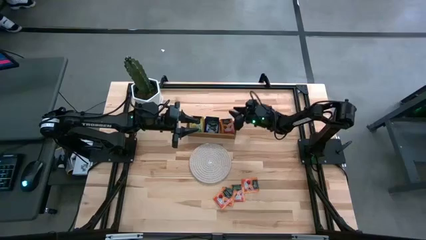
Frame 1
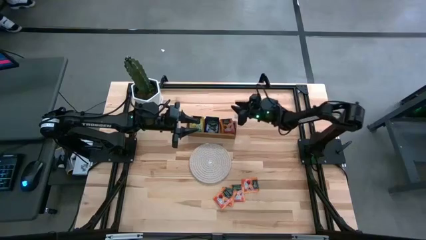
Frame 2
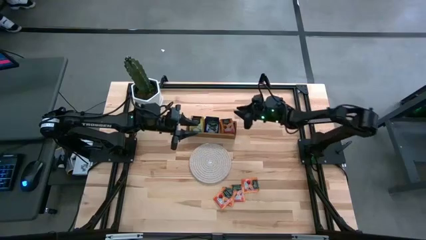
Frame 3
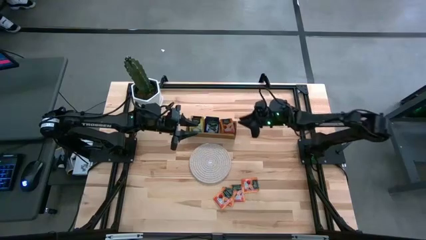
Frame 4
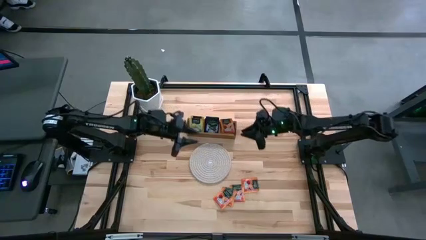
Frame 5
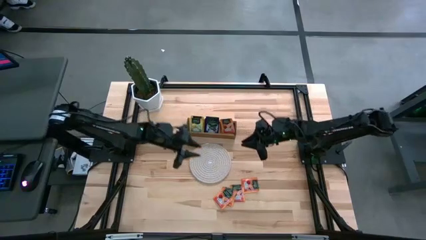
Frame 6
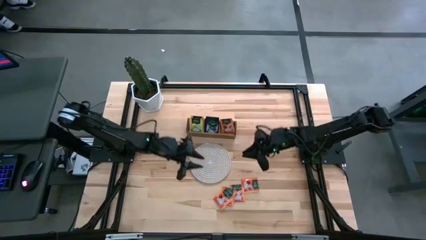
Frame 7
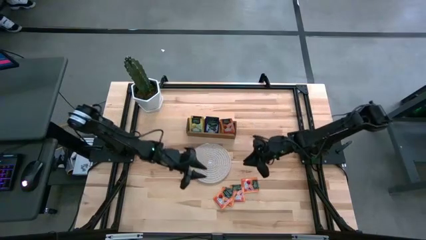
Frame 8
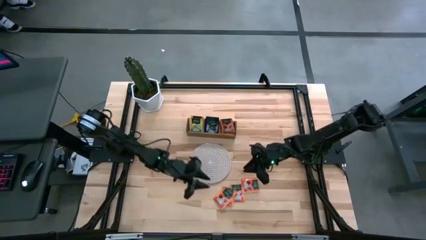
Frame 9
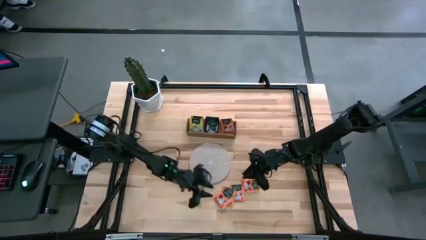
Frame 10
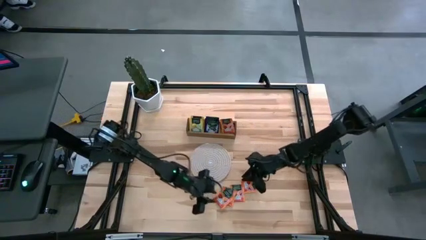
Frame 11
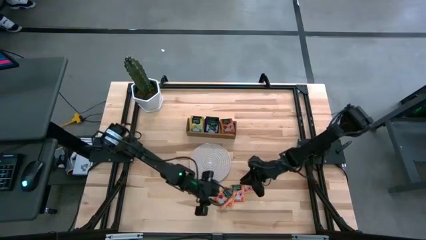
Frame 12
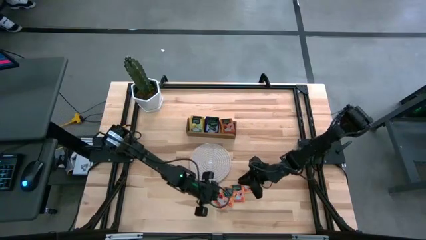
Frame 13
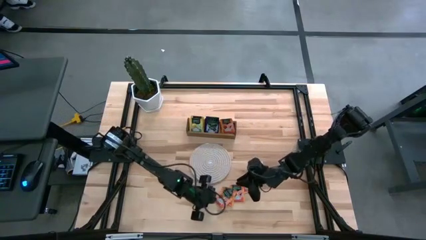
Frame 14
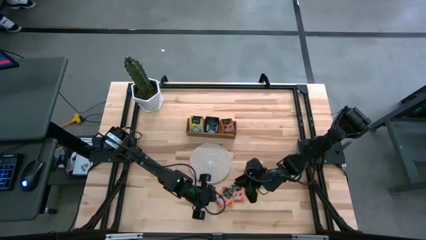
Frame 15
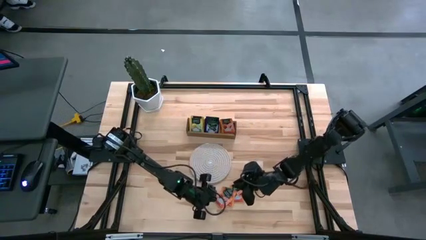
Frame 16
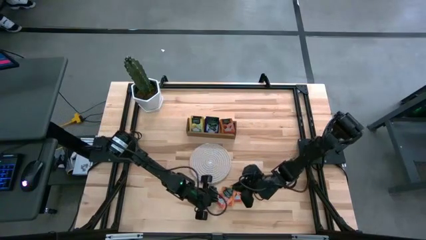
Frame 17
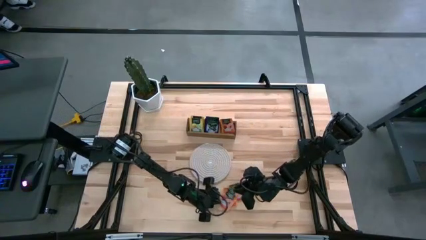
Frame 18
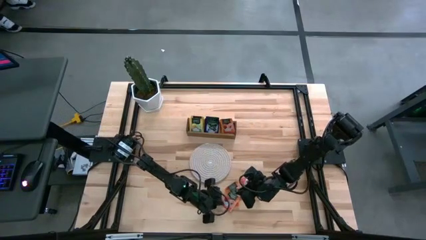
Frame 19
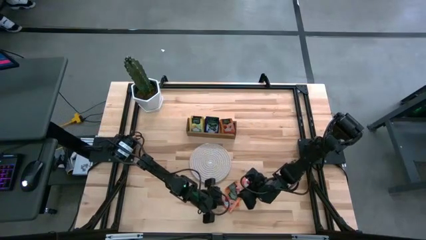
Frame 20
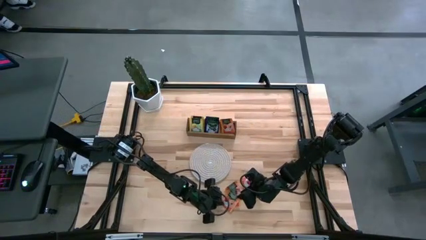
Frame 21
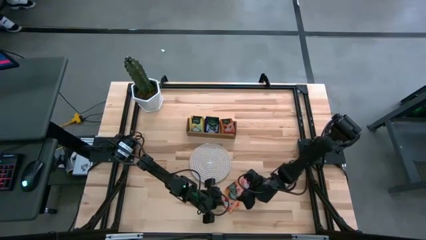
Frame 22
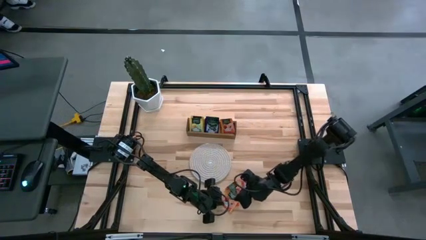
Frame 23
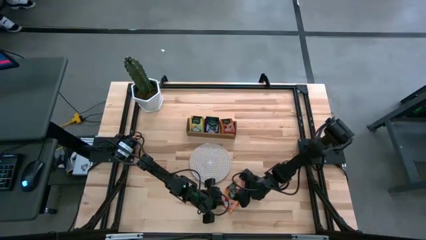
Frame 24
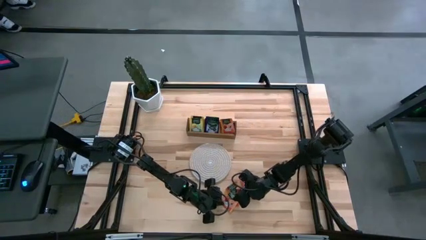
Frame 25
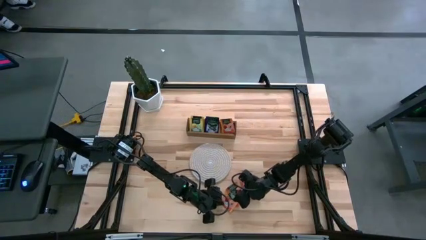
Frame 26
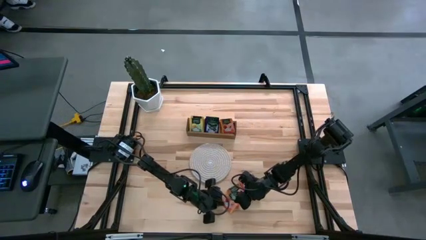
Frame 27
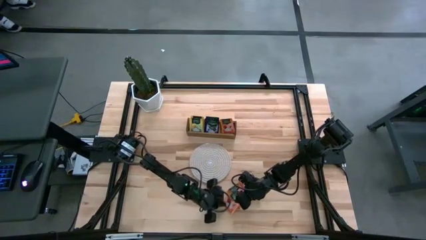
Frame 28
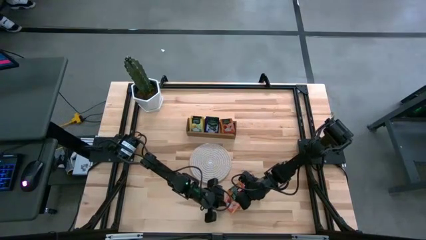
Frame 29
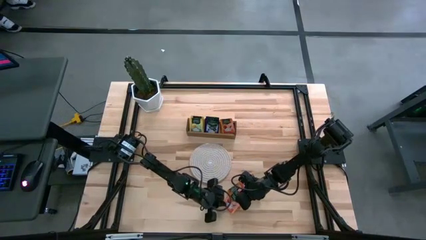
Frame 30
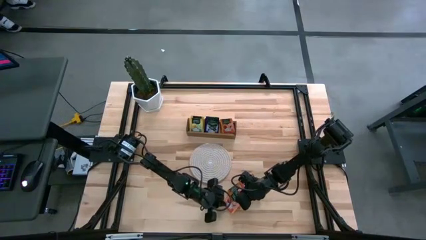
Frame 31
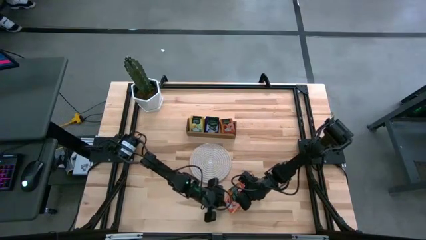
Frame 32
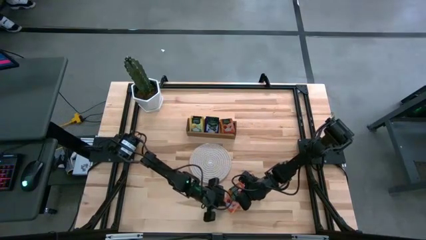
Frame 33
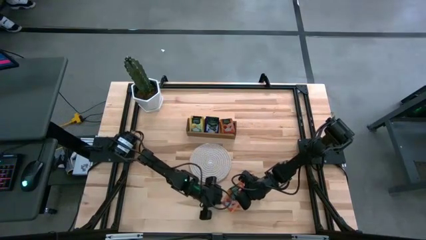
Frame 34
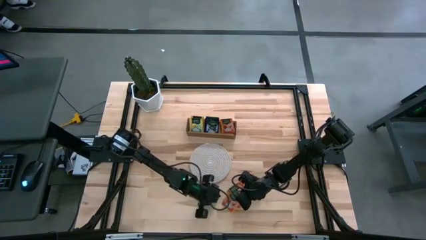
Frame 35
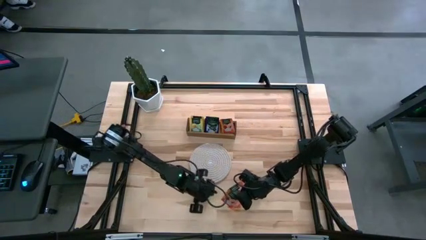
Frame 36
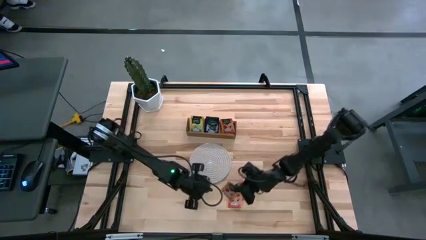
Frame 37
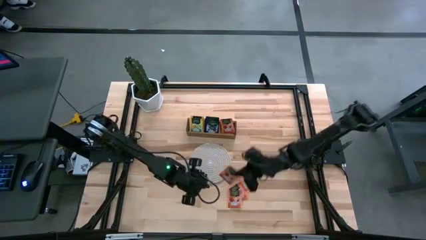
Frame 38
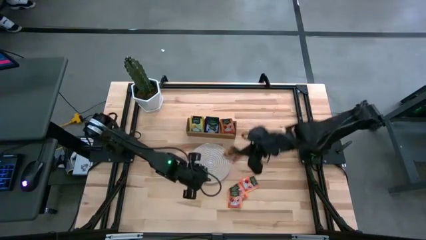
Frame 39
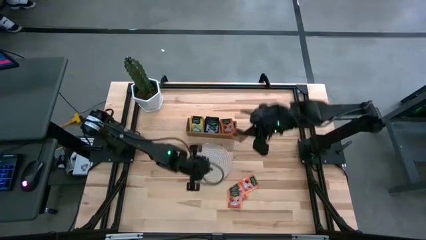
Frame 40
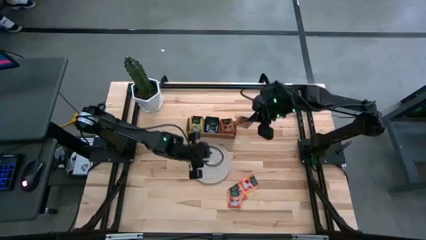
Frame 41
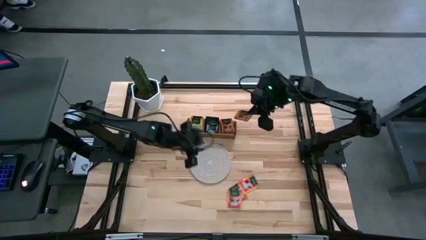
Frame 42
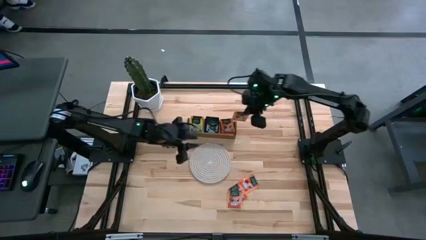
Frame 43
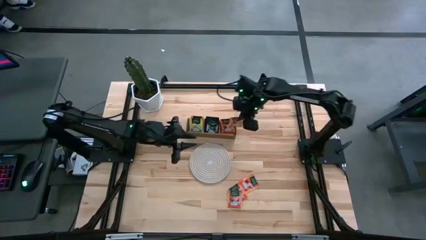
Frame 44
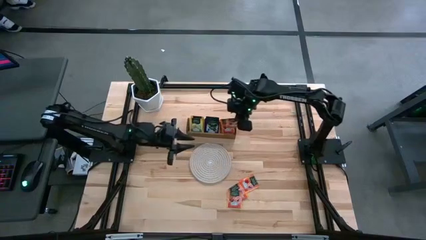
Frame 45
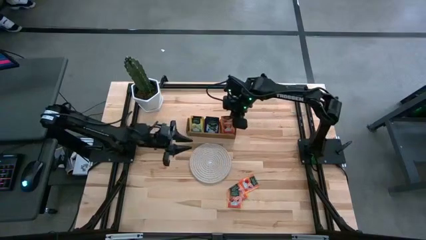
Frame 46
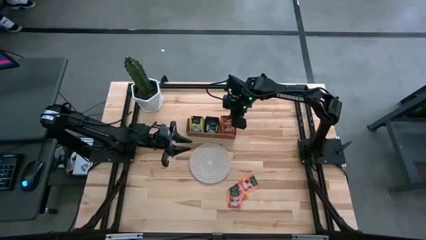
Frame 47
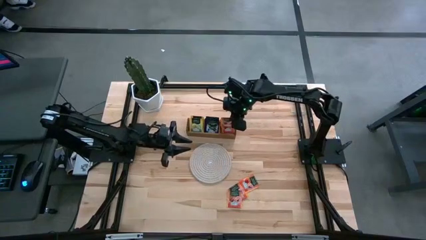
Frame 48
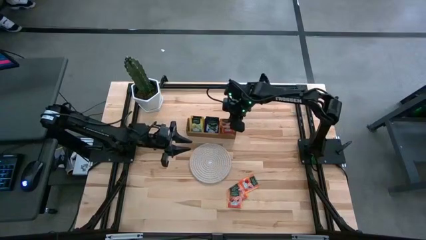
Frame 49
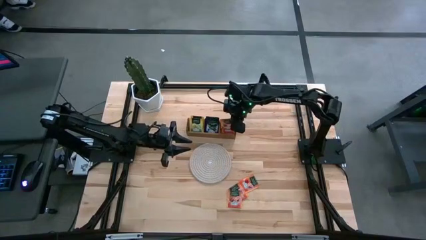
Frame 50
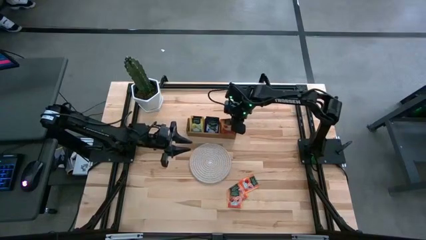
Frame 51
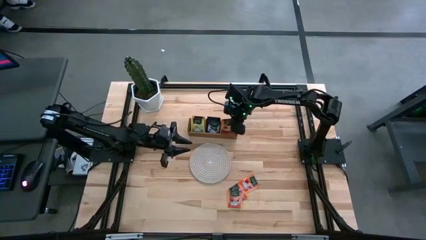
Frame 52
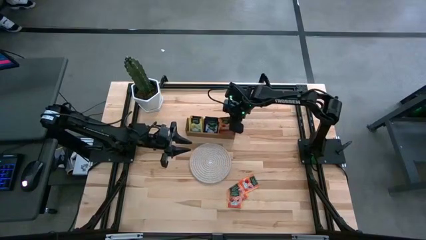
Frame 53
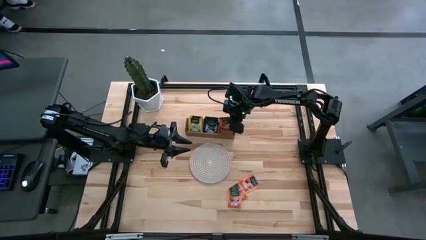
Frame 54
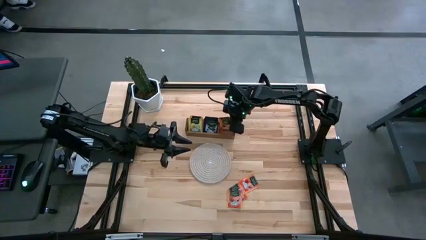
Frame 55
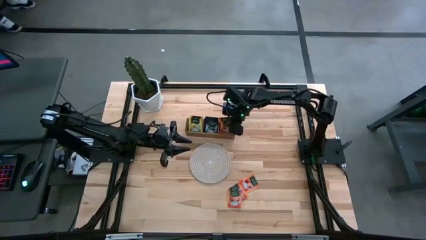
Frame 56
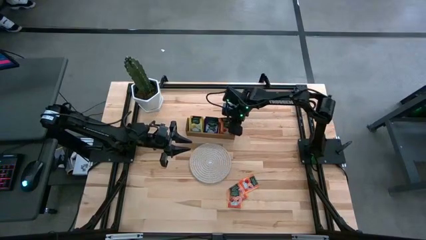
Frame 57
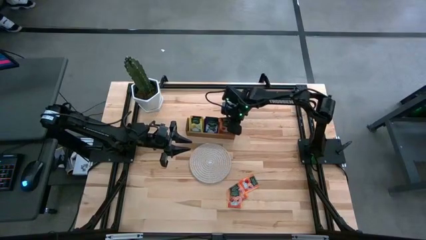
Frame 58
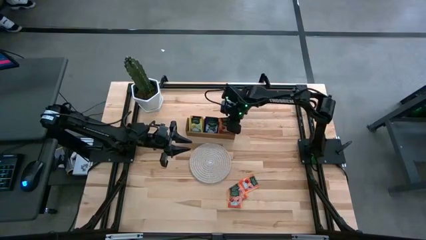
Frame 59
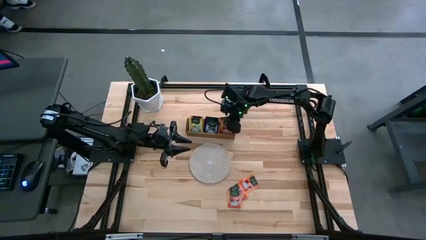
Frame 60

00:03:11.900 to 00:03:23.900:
Task: Pick & Place Tea
Put the orange tea bag into the right section of the wooden organizer

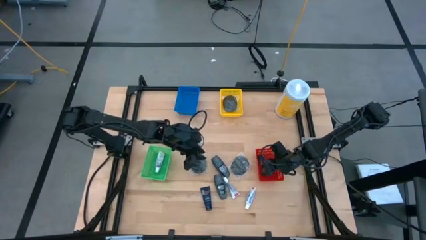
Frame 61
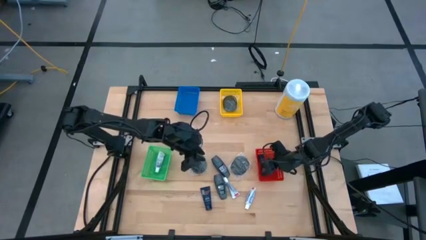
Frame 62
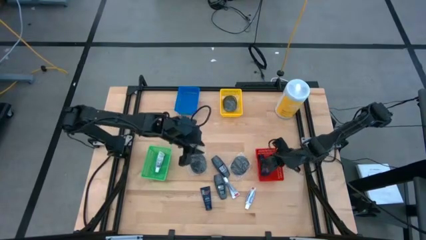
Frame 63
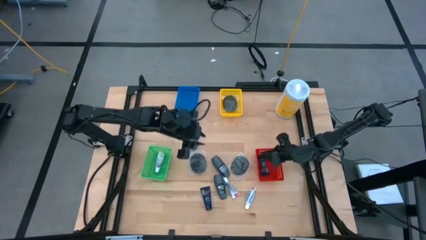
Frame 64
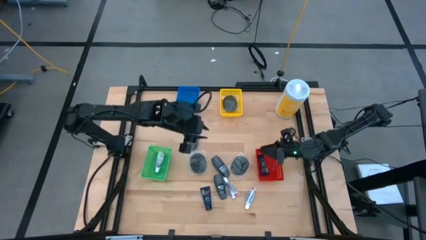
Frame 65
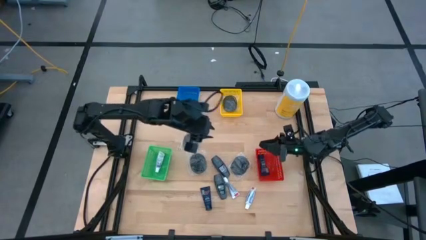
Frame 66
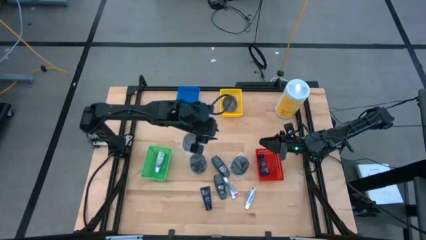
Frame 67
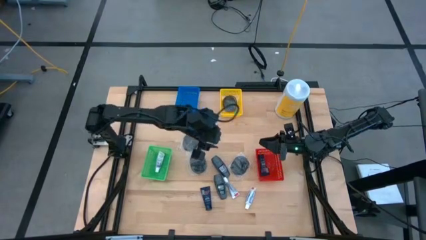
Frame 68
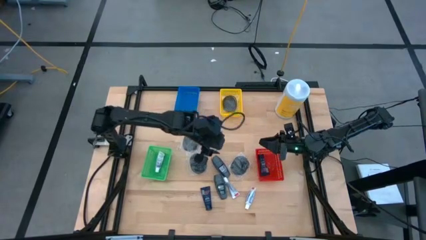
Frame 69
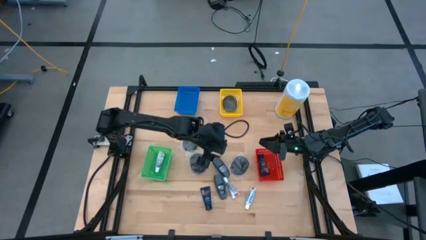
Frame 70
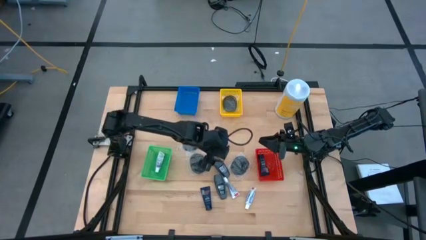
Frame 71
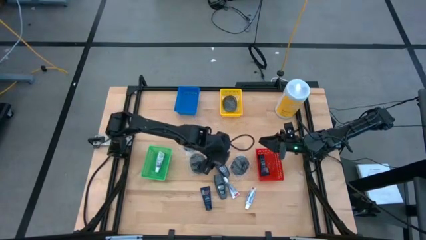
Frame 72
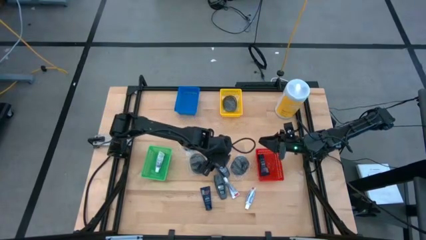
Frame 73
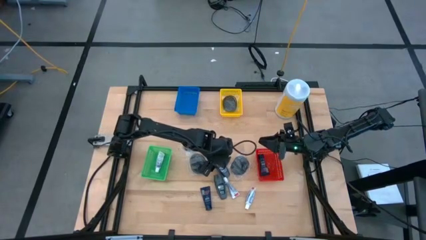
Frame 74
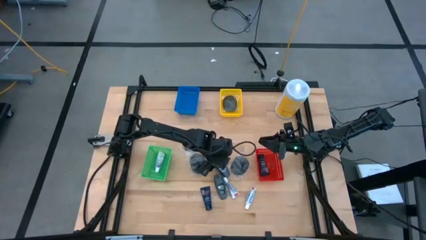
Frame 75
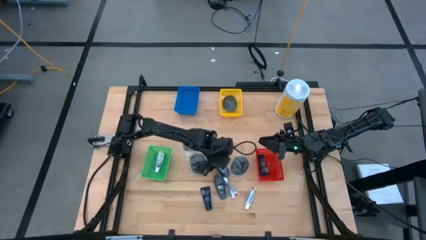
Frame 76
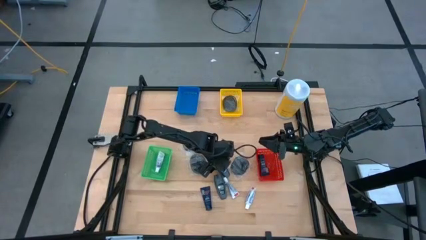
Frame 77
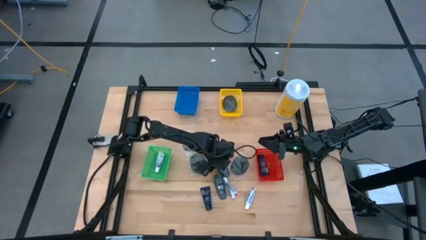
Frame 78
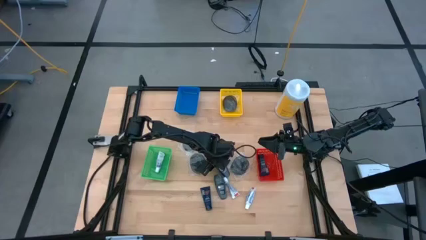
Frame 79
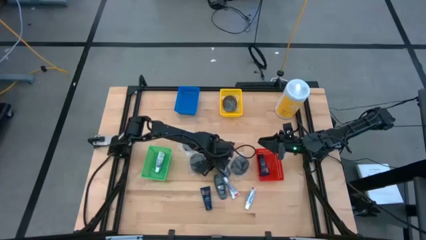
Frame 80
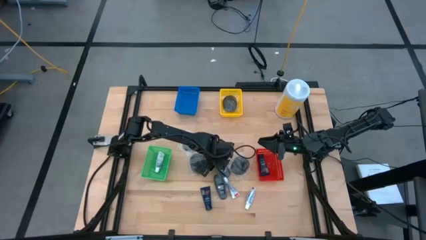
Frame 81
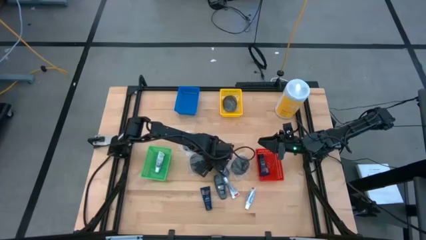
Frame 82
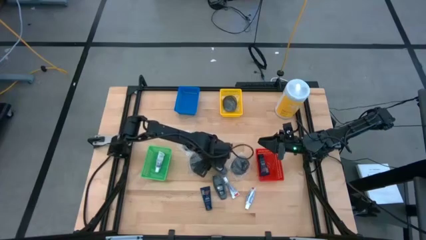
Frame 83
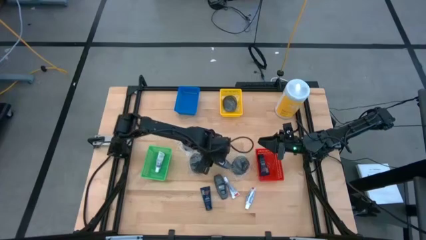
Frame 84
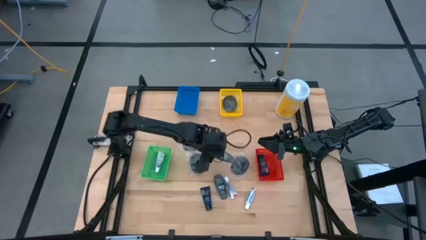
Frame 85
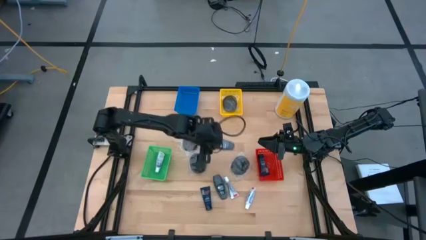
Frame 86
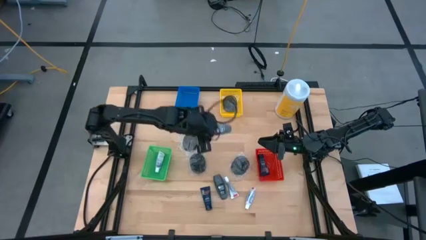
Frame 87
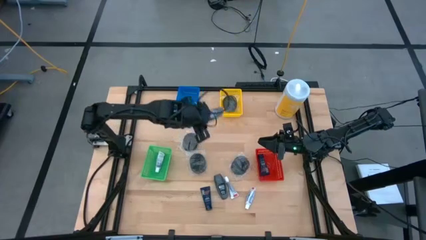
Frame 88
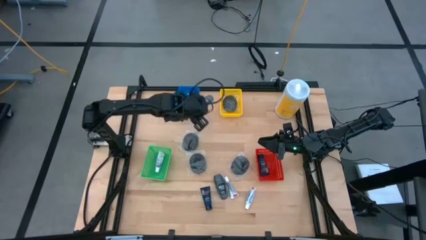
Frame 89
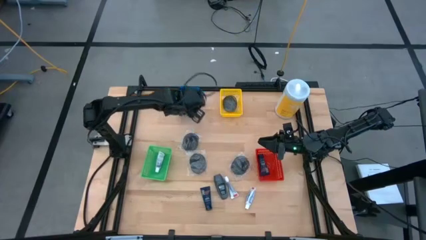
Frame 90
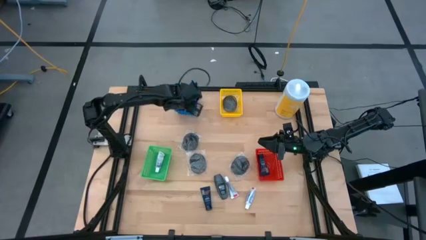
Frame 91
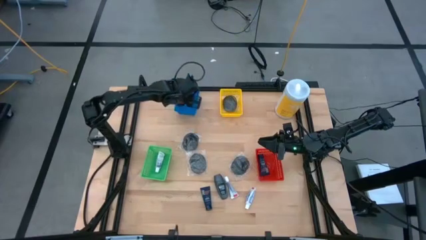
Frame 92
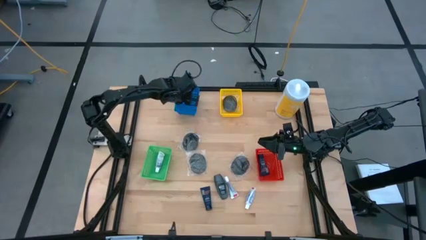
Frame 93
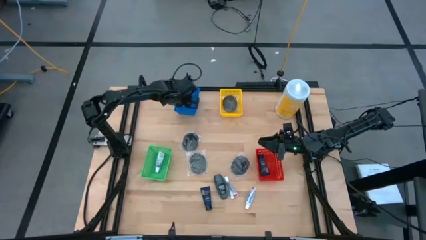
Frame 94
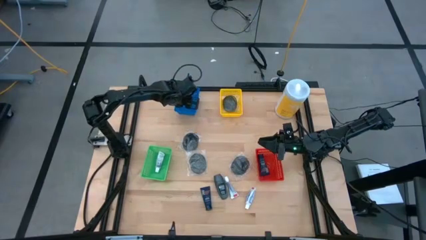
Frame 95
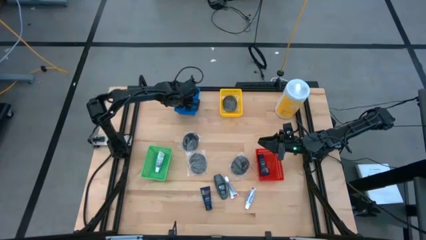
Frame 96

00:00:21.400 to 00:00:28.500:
Task: Pick & Place Travel size toiletries
Put the gray deodorant into the blue bin
